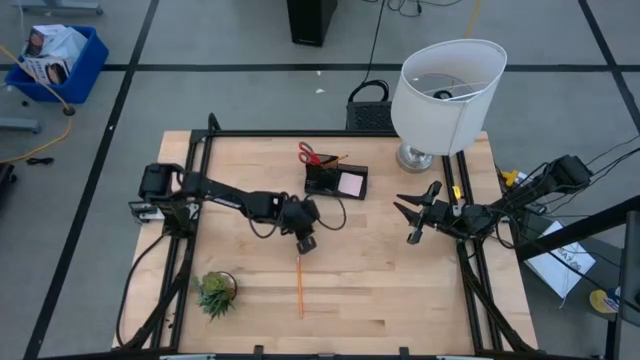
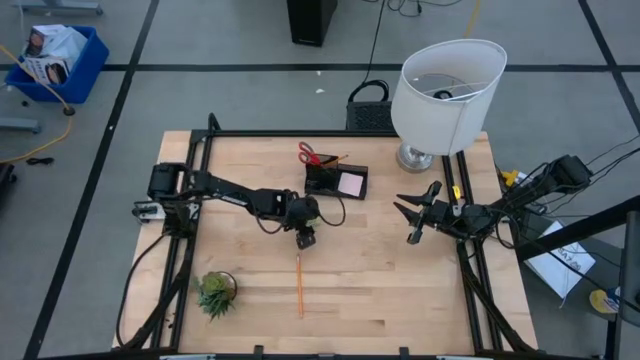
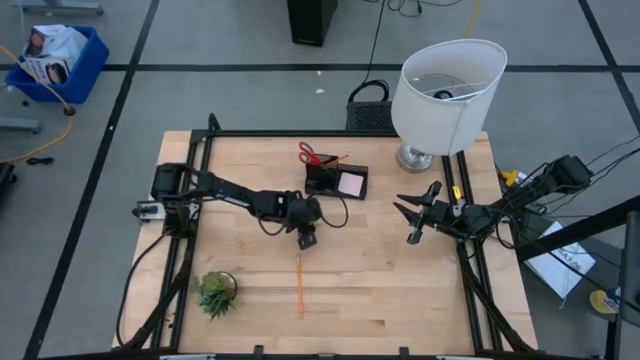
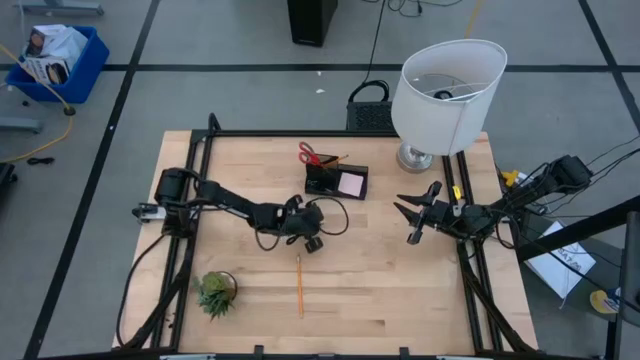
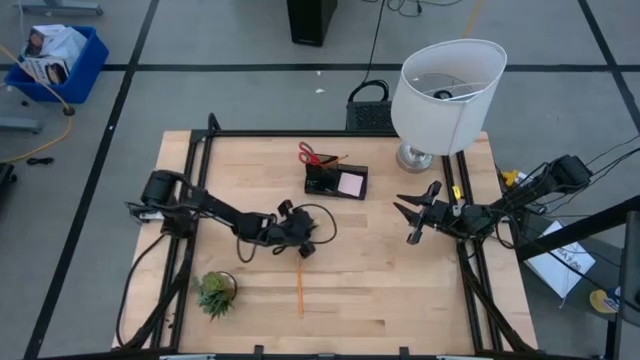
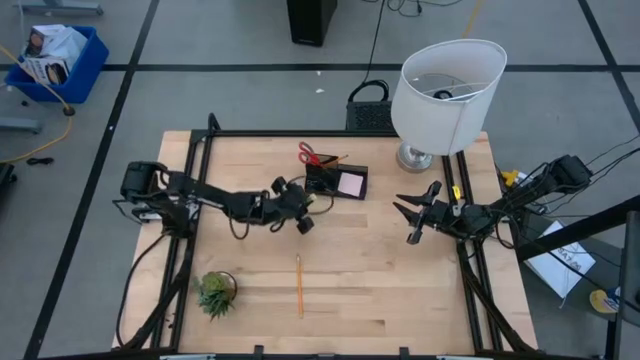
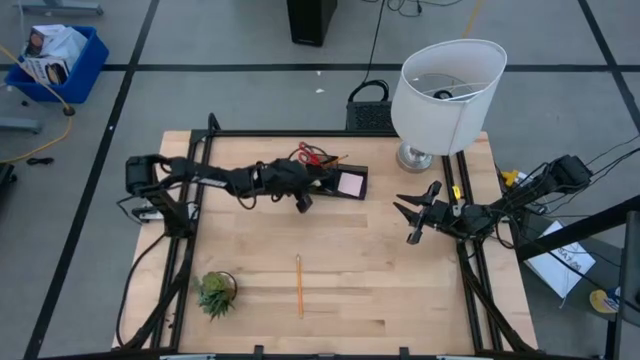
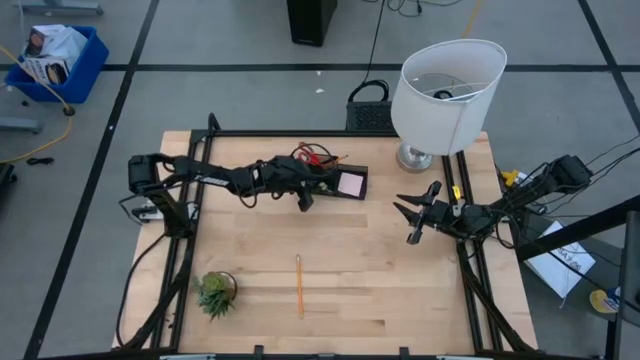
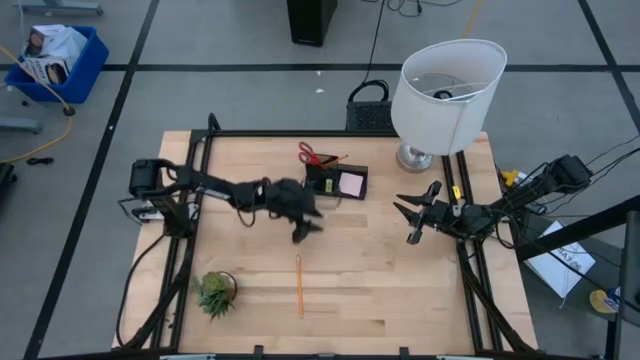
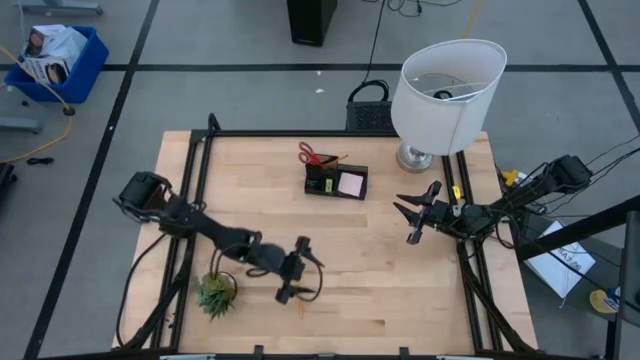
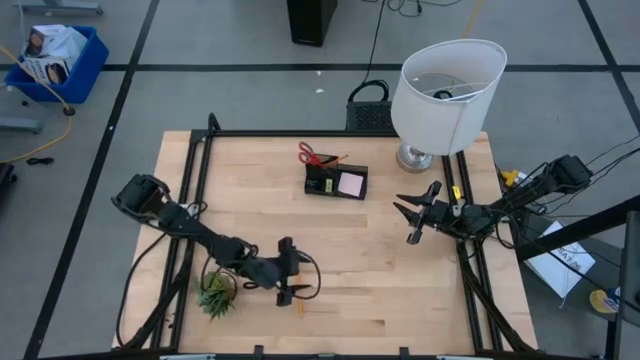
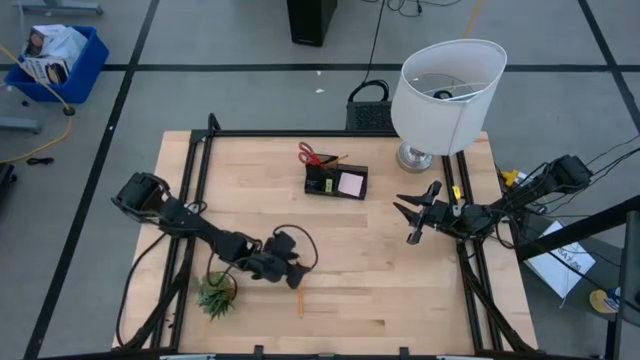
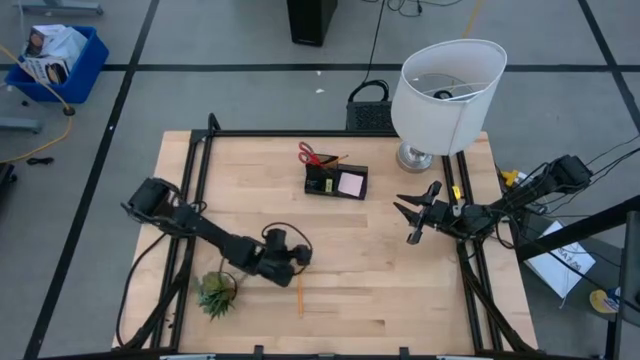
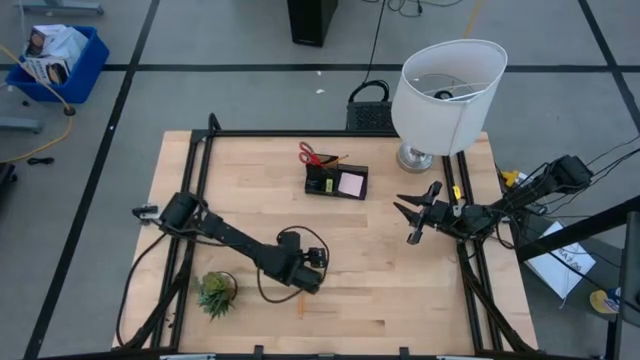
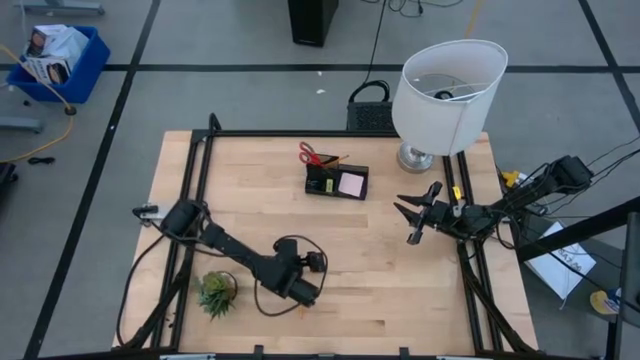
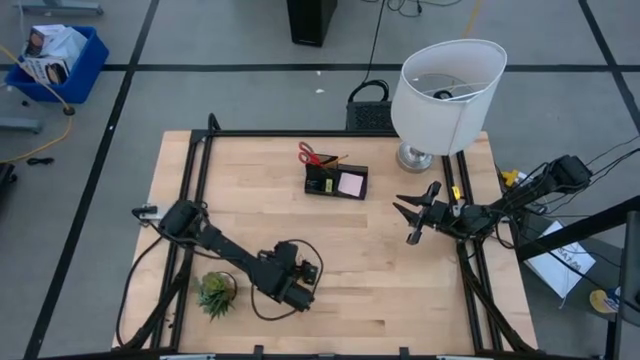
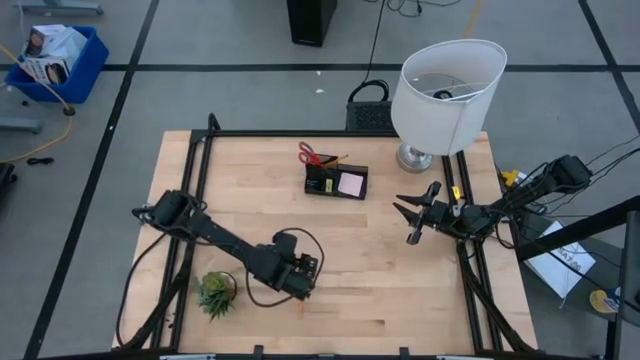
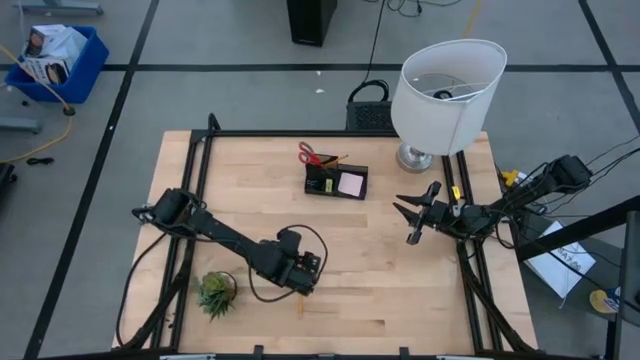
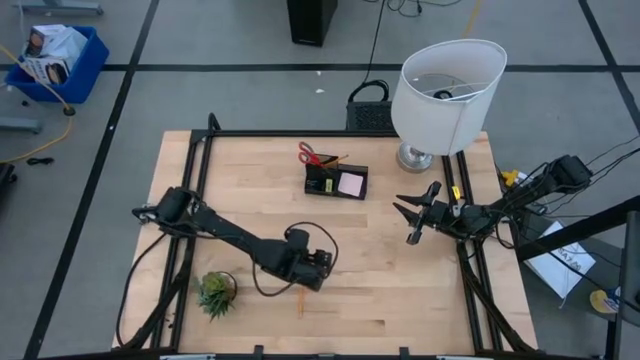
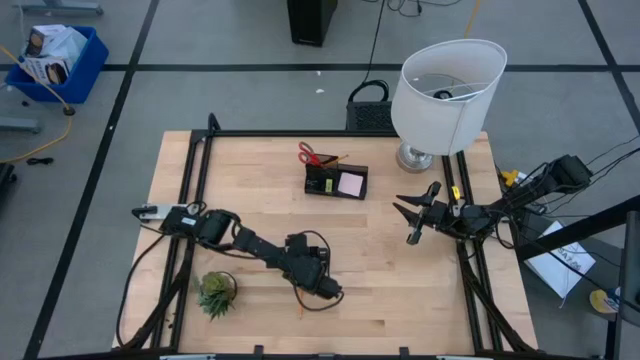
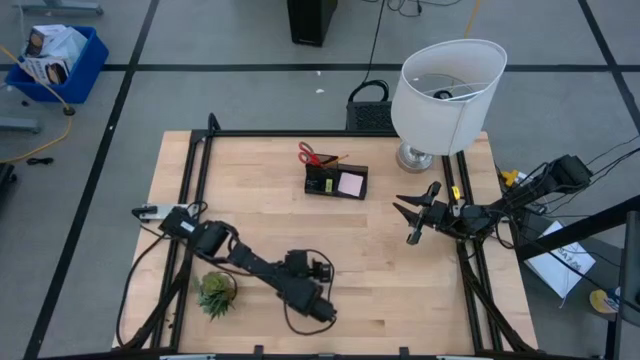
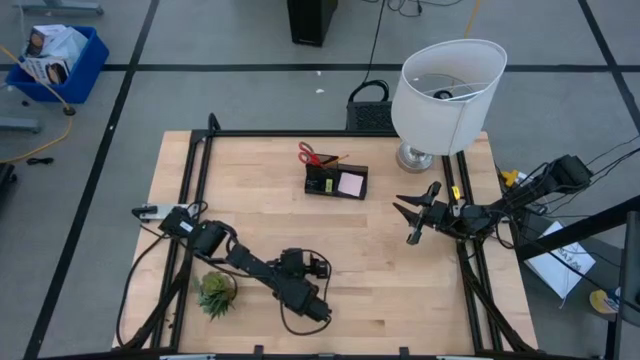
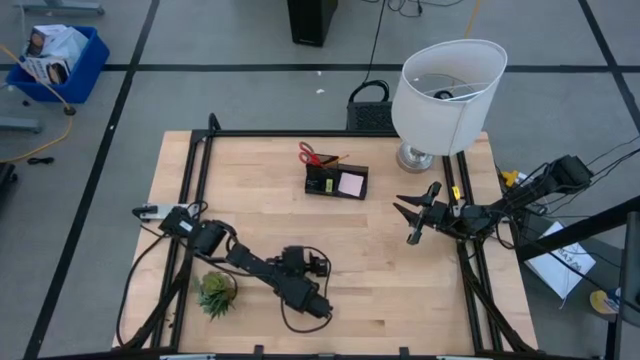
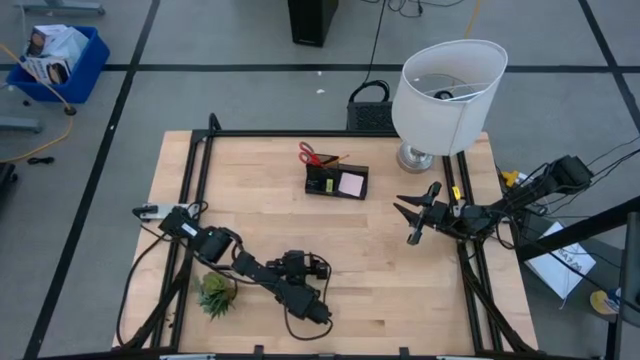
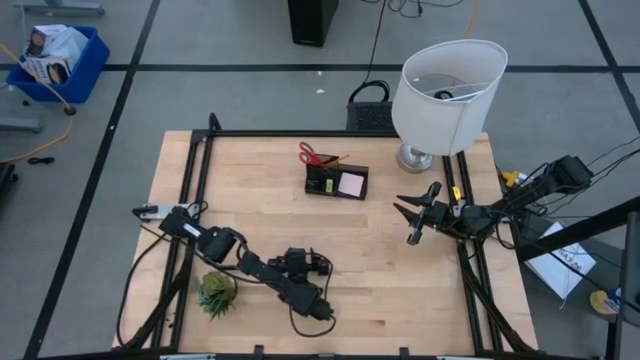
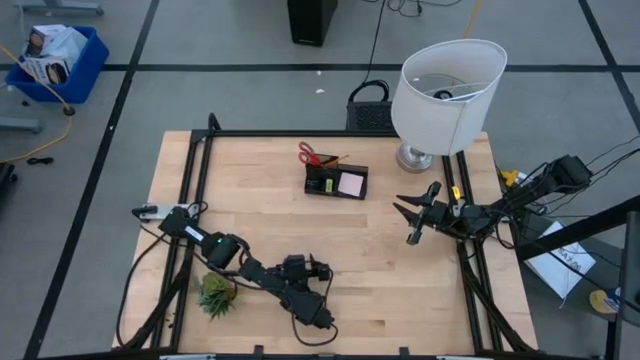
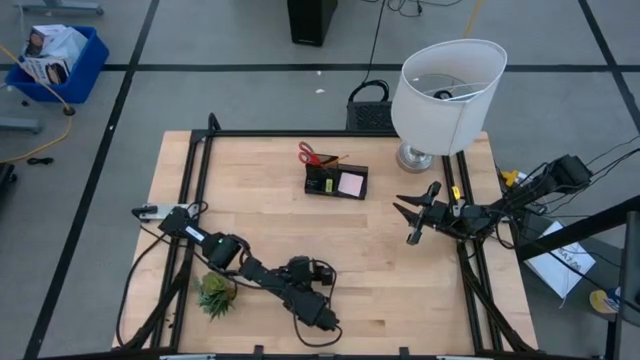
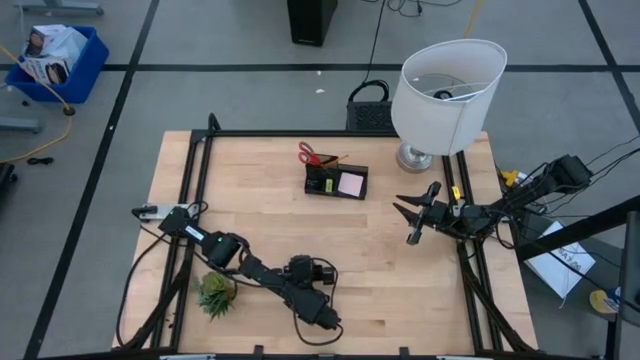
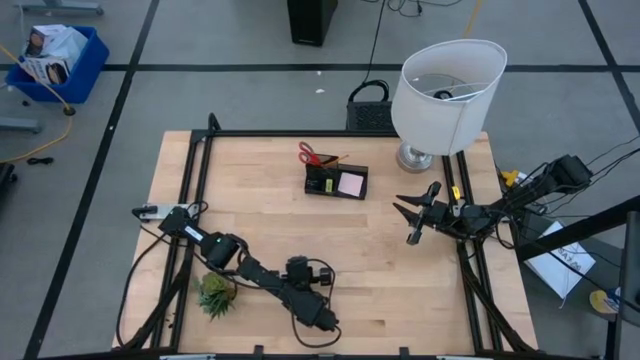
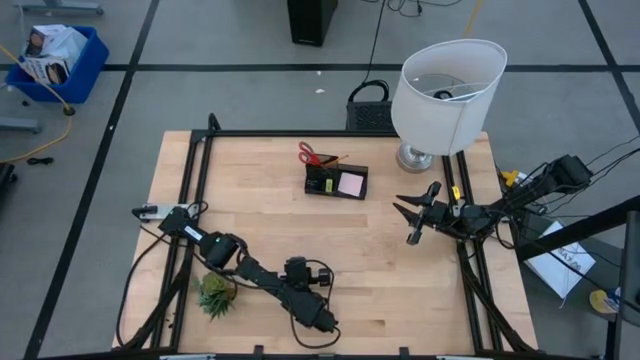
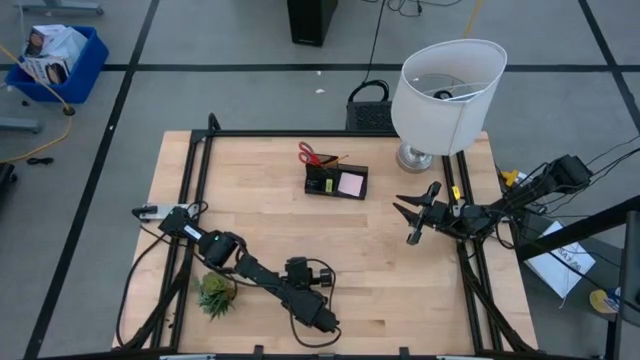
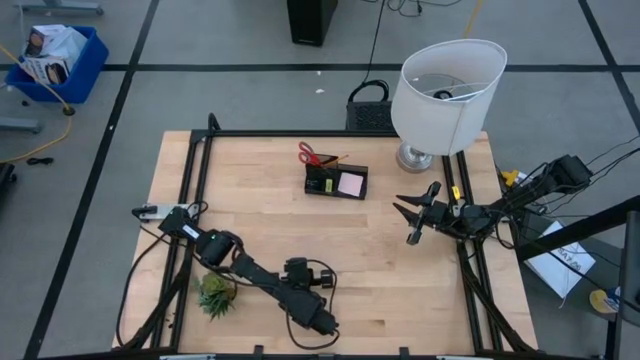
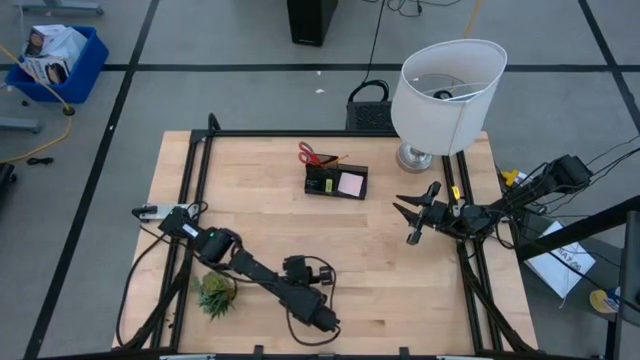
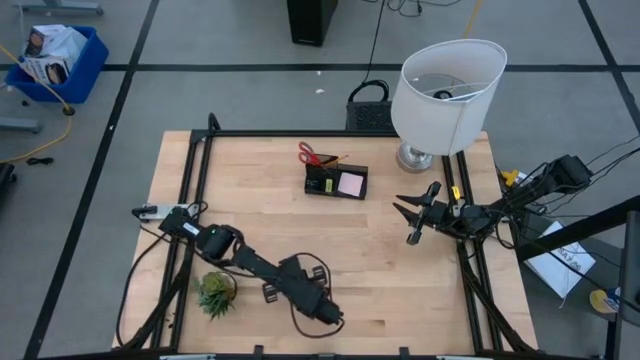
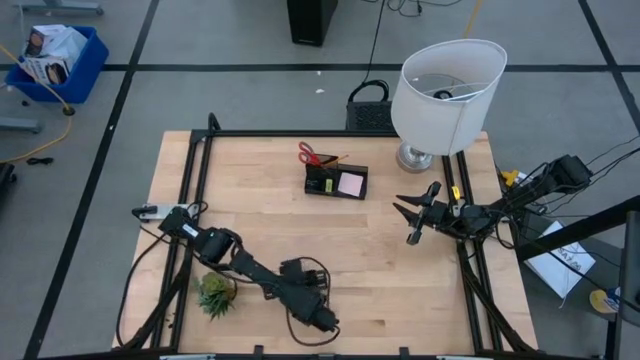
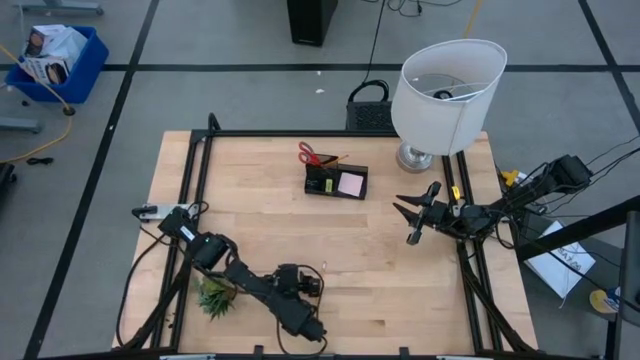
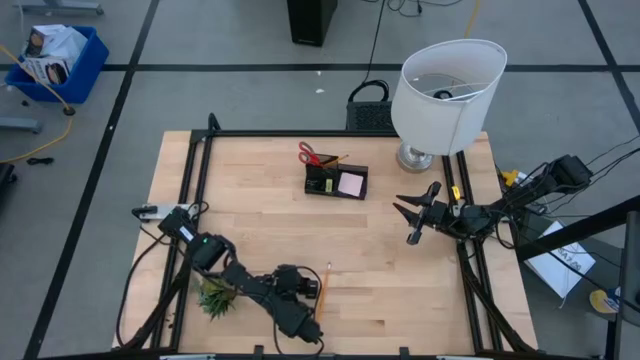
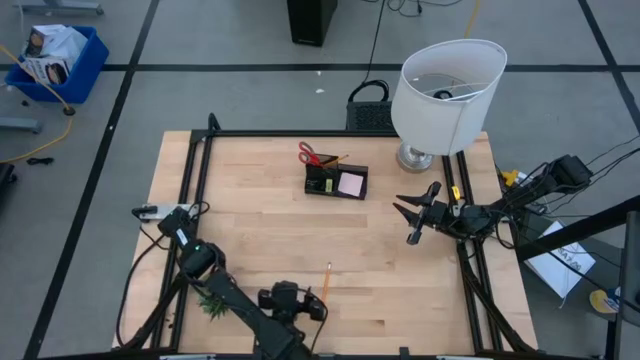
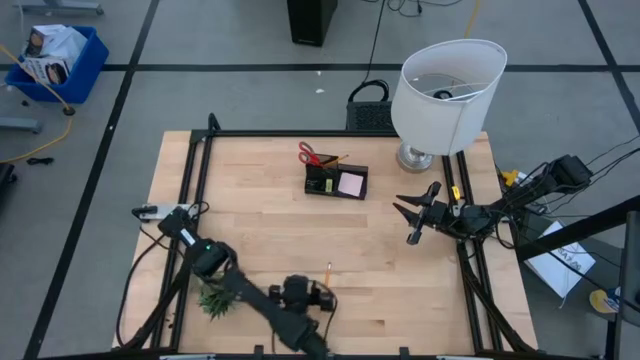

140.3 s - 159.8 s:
Task: Pick and place office supplies into organizer
Put the yellow pencil into the desk organizer
